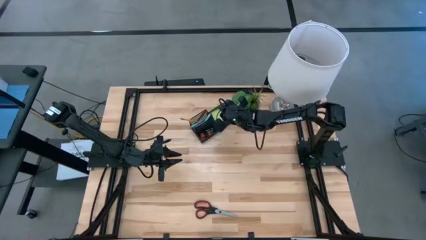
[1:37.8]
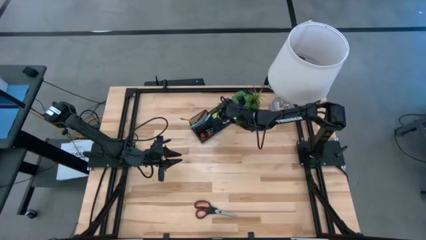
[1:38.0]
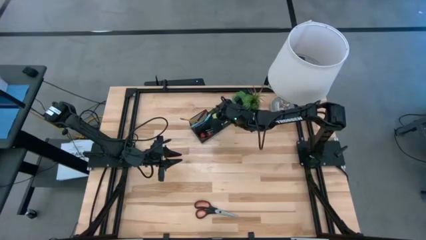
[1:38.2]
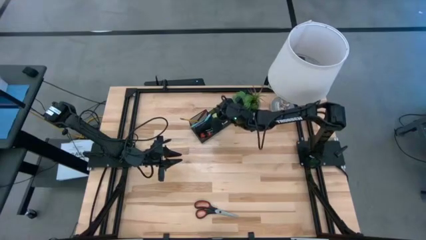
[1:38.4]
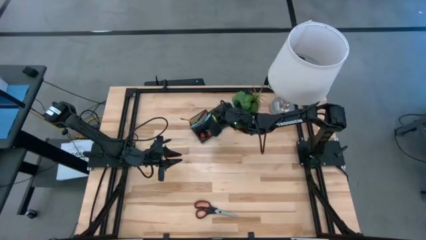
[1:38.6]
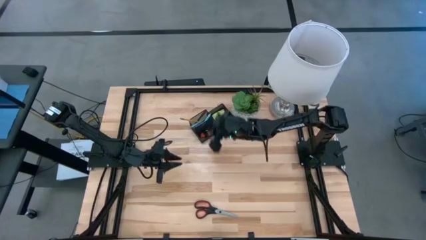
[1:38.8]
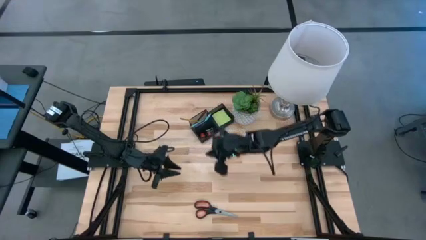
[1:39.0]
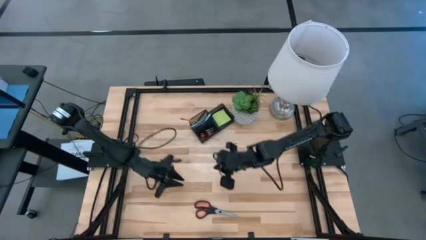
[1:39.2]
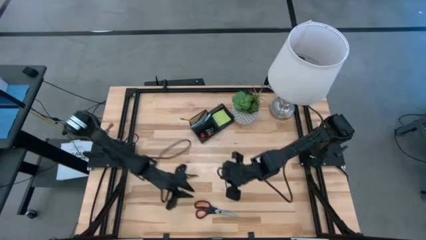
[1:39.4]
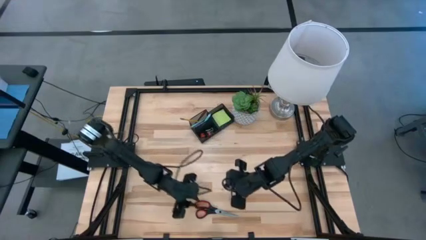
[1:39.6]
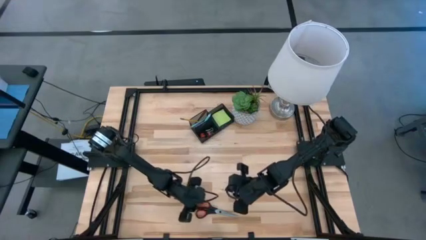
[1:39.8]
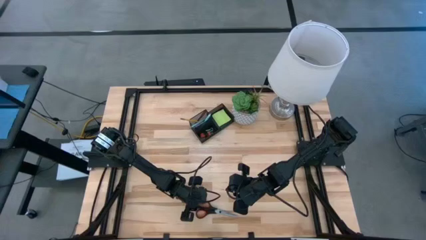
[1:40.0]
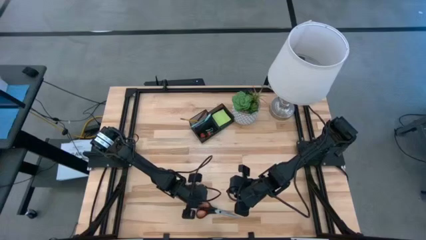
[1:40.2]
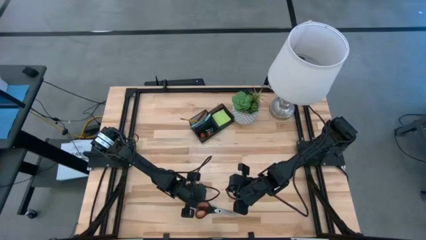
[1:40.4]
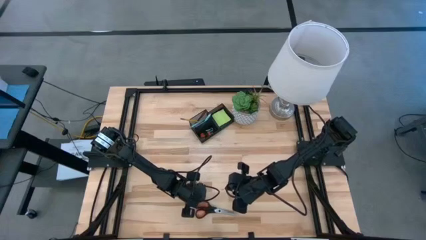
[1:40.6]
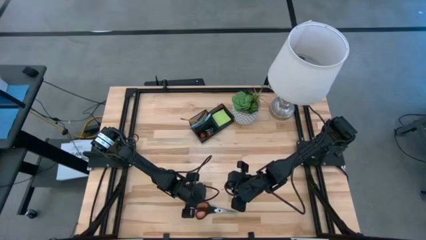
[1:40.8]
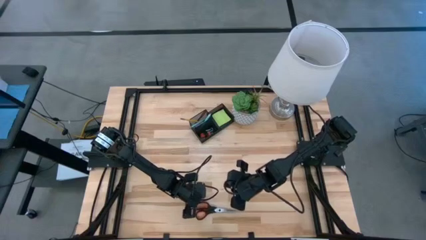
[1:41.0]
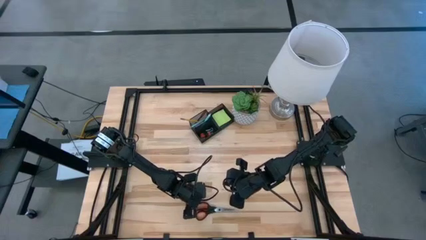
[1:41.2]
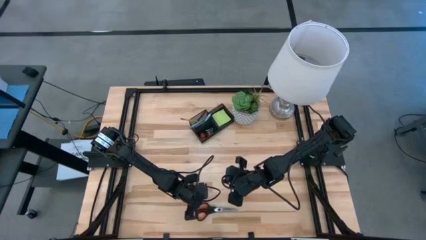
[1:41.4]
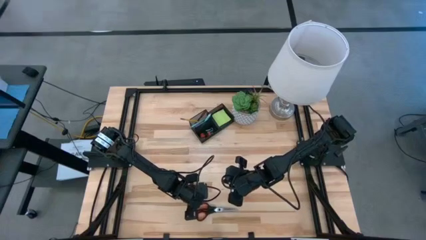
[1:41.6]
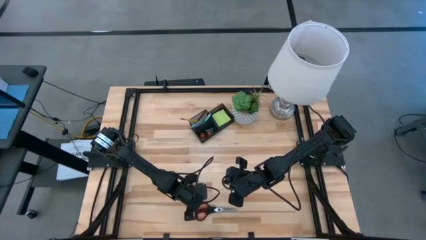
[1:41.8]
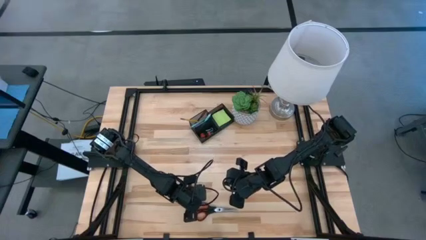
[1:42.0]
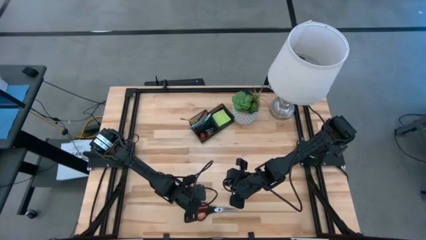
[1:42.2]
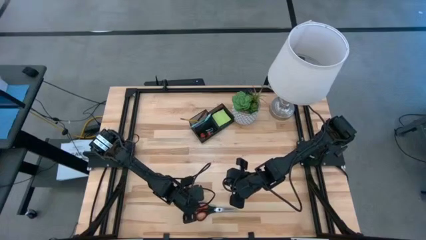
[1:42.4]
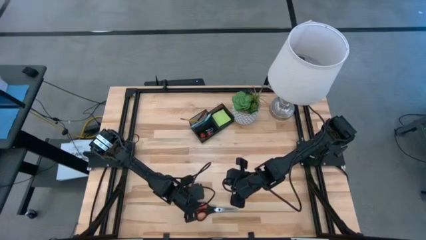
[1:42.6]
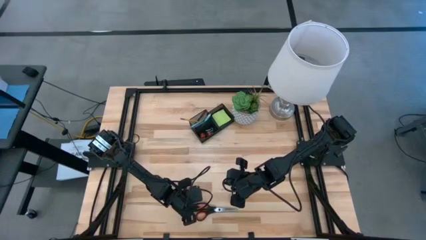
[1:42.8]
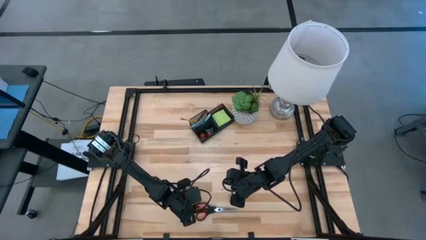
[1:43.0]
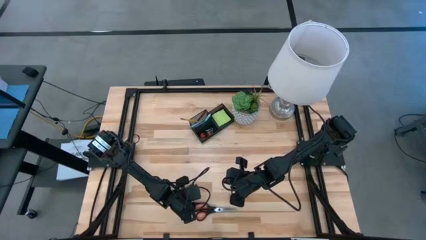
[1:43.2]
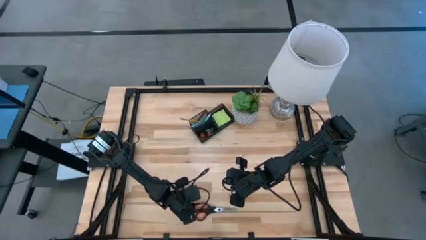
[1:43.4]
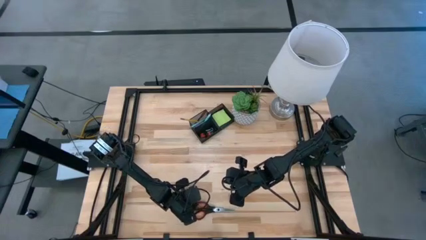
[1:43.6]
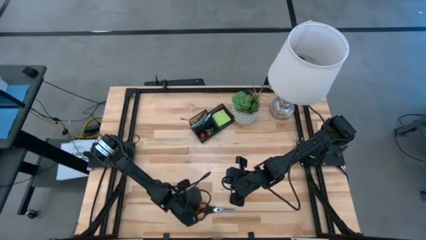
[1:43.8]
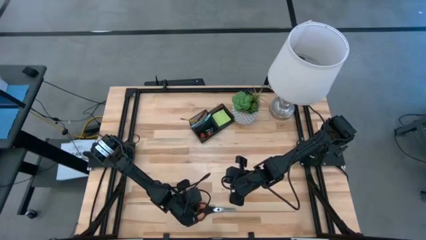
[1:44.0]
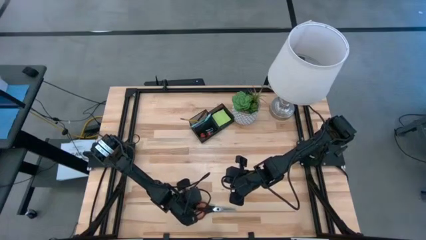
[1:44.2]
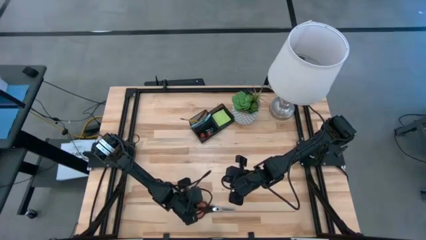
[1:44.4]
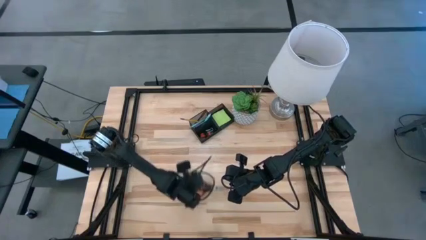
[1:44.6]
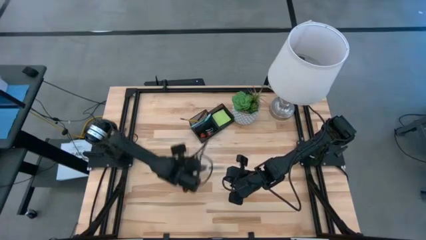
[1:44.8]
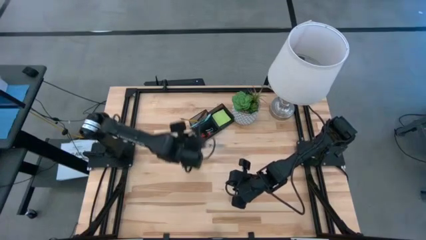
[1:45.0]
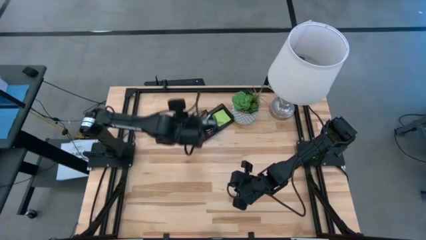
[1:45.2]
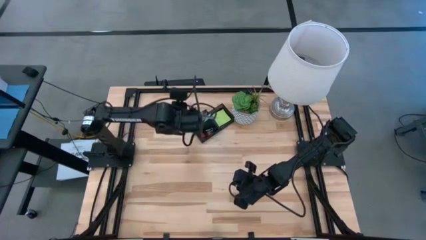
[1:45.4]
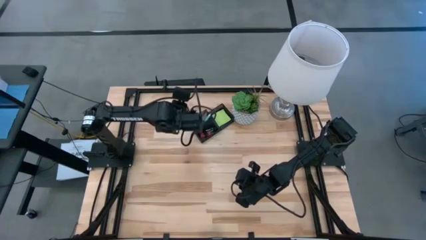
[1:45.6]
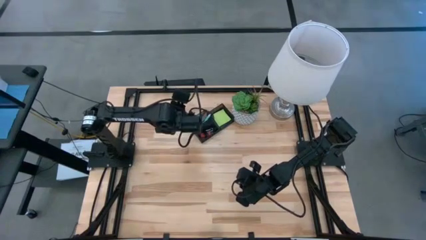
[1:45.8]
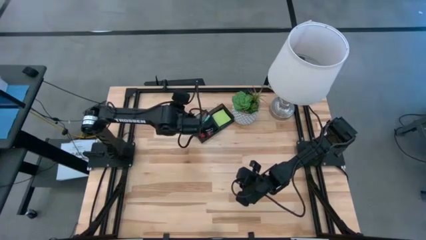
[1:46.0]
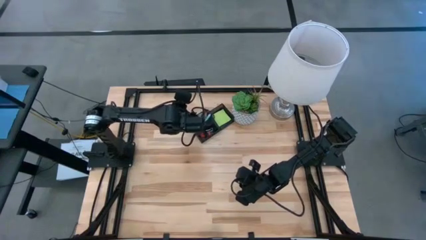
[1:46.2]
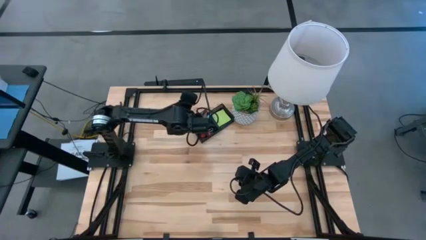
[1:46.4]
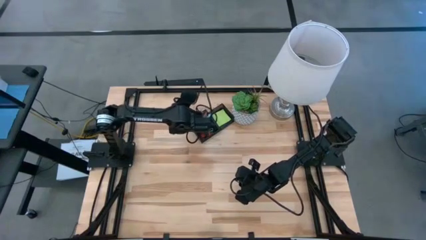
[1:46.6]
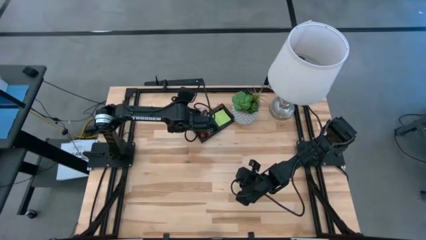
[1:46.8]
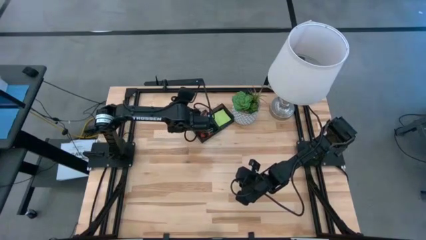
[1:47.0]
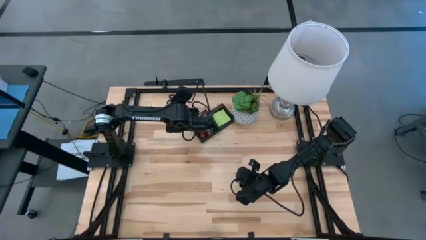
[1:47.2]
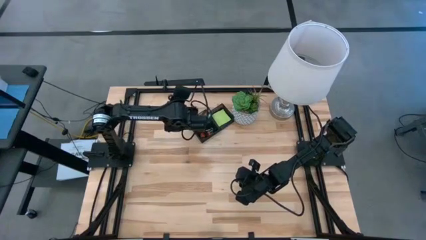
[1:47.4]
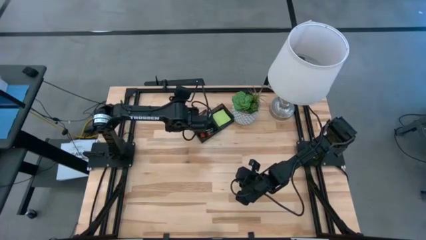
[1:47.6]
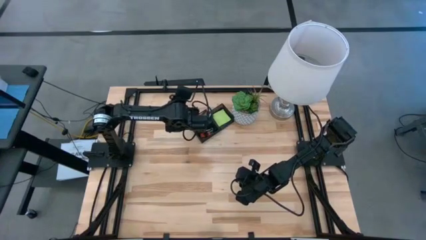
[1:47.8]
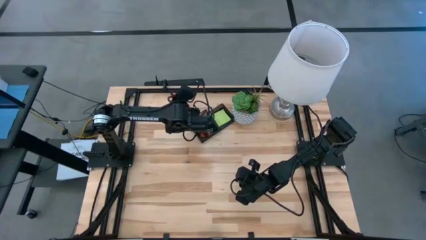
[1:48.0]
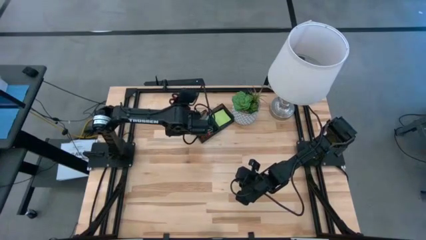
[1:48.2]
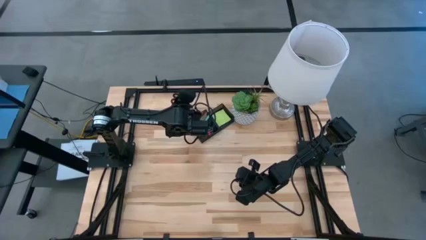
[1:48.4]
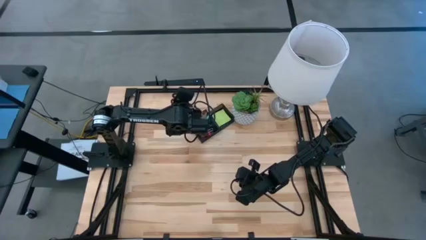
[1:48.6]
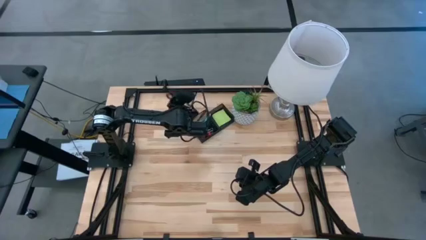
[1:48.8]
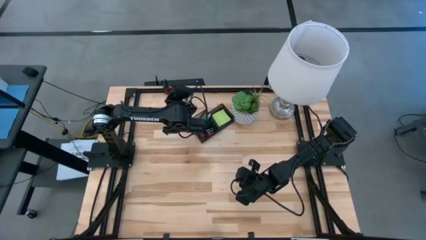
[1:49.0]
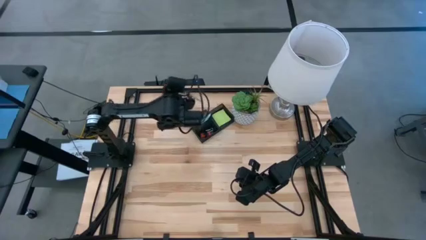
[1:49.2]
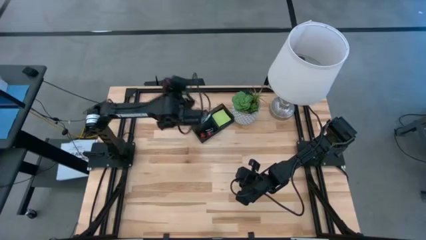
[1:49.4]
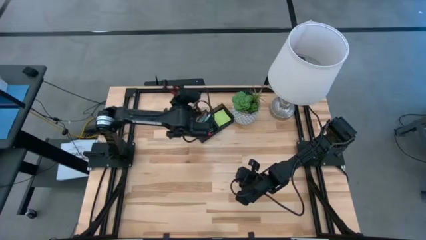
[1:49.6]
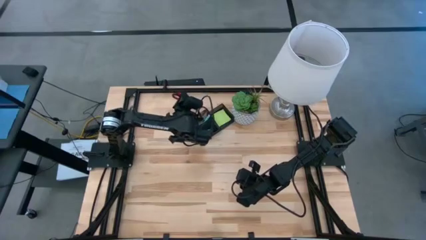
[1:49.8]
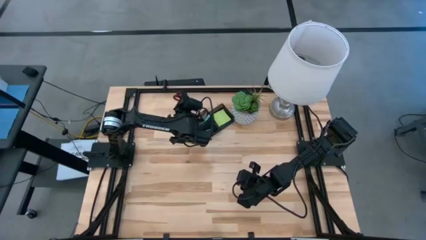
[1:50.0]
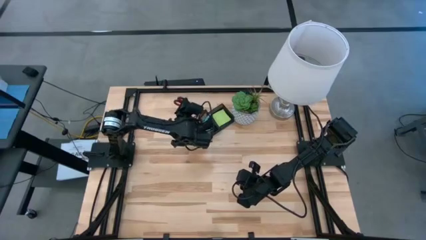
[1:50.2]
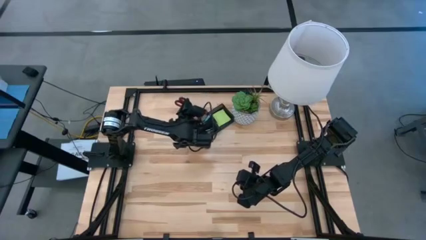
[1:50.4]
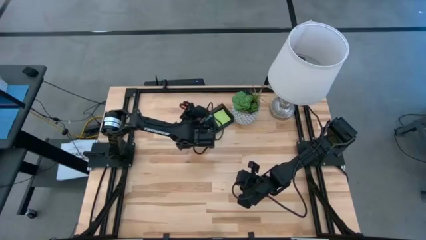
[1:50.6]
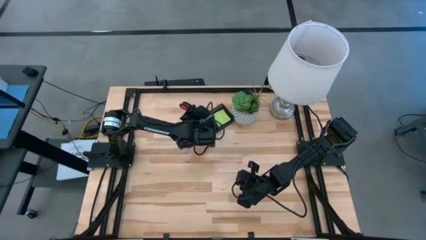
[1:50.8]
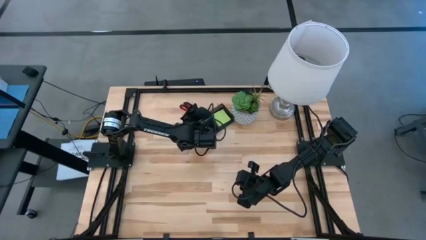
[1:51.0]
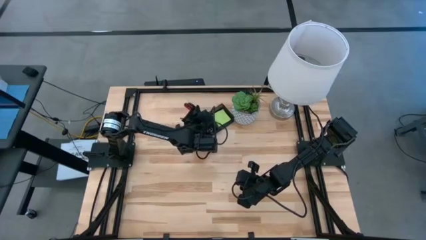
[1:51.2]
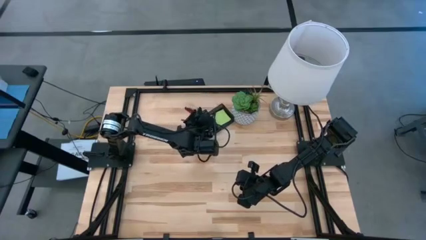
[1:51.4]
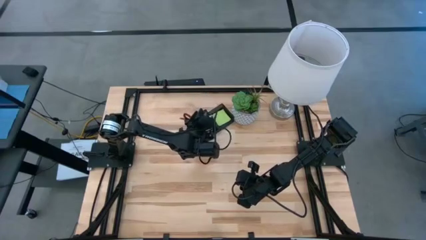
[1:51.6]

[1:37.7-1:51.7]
Task: Pick and place office supplies into organizer
Put the black scissors into the top left compartment of the black desk organizer
